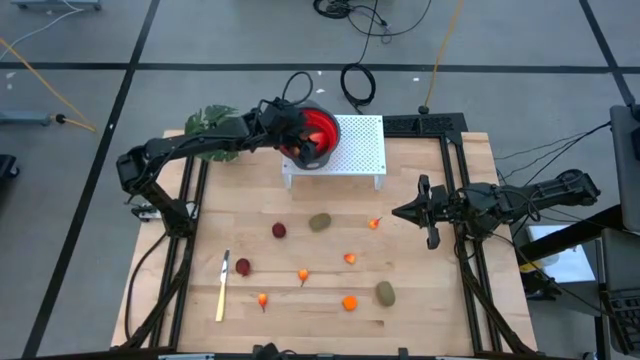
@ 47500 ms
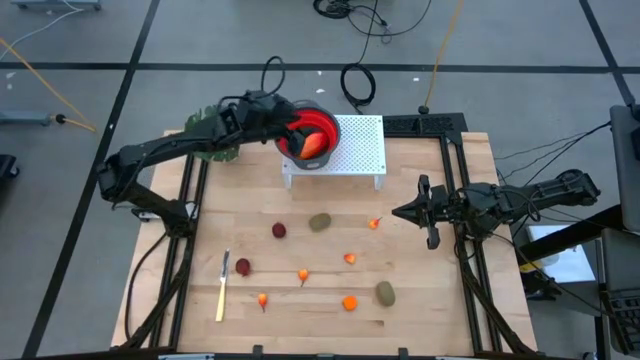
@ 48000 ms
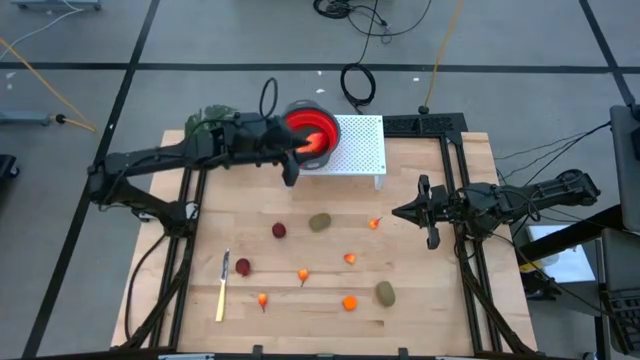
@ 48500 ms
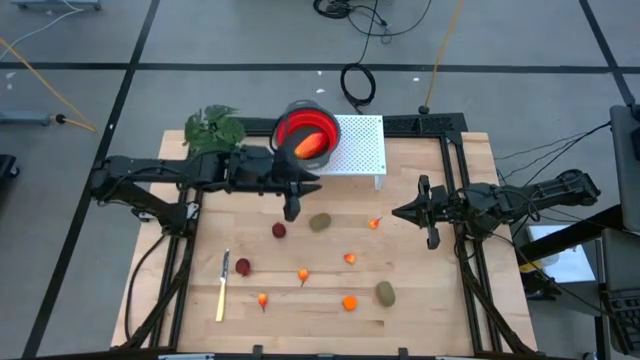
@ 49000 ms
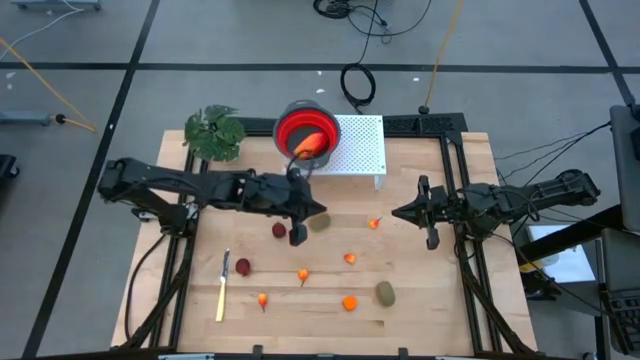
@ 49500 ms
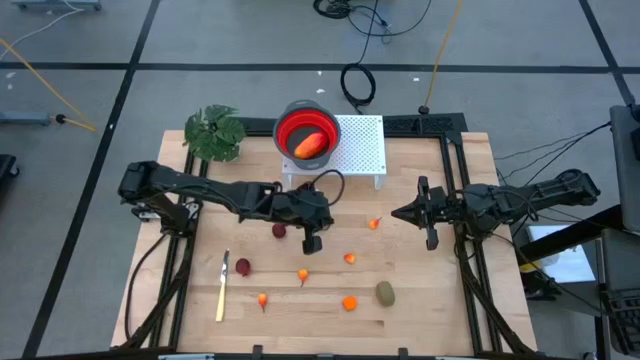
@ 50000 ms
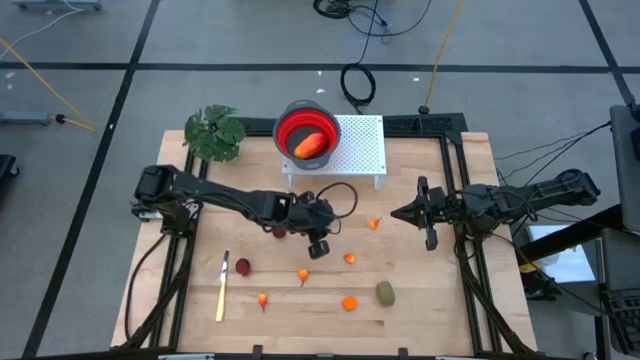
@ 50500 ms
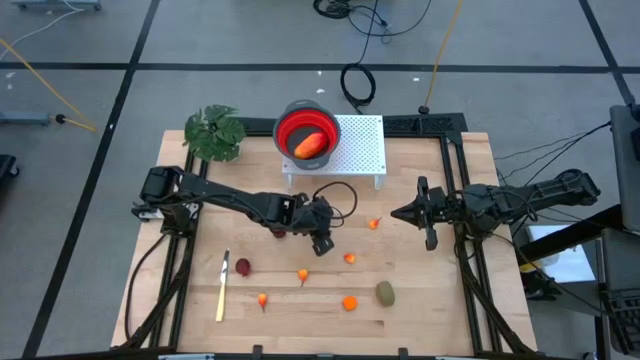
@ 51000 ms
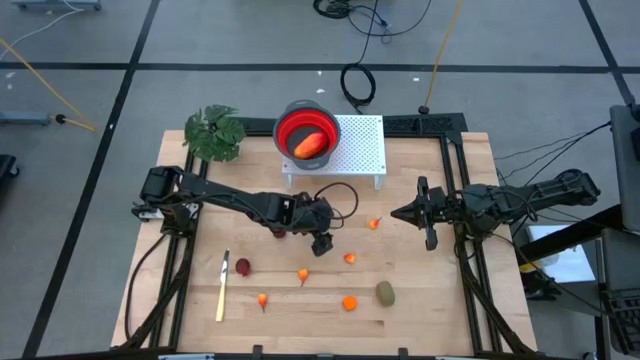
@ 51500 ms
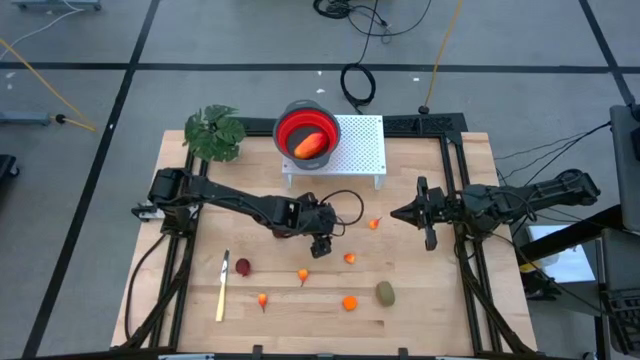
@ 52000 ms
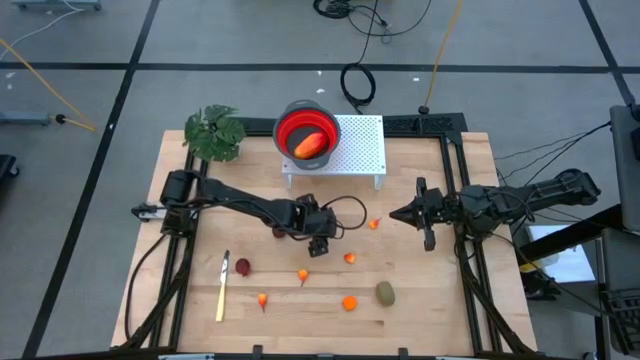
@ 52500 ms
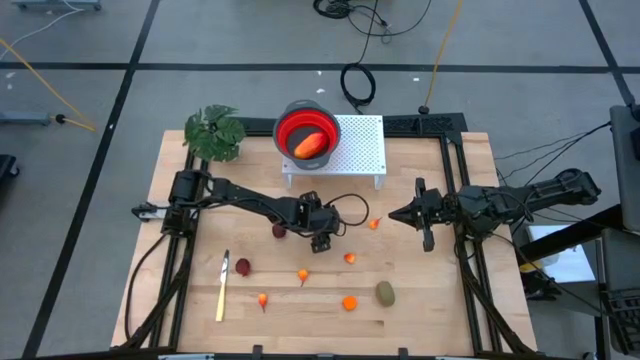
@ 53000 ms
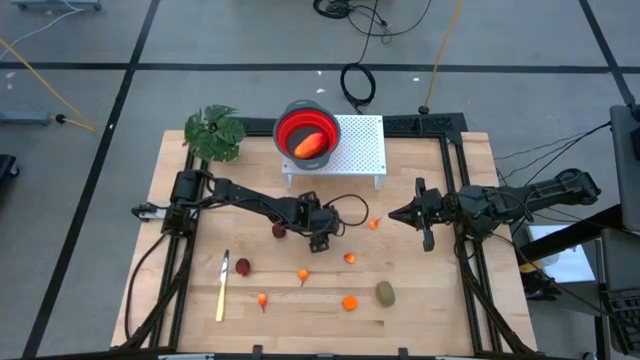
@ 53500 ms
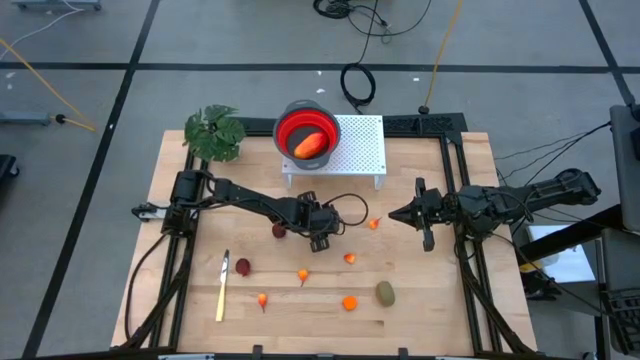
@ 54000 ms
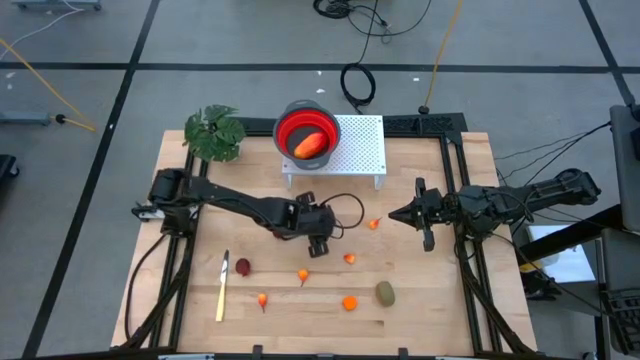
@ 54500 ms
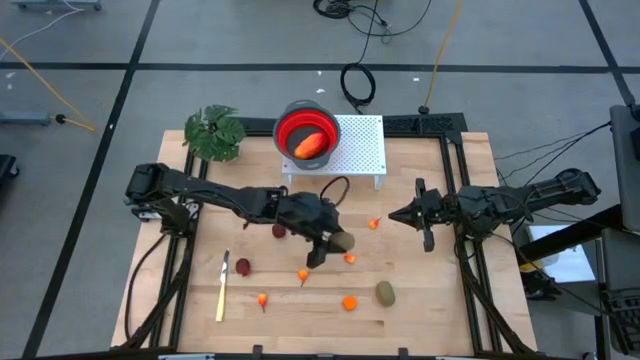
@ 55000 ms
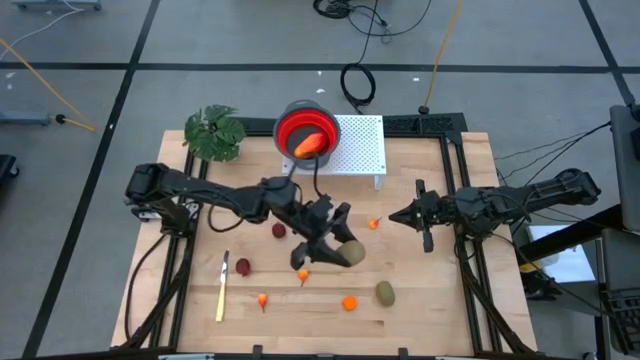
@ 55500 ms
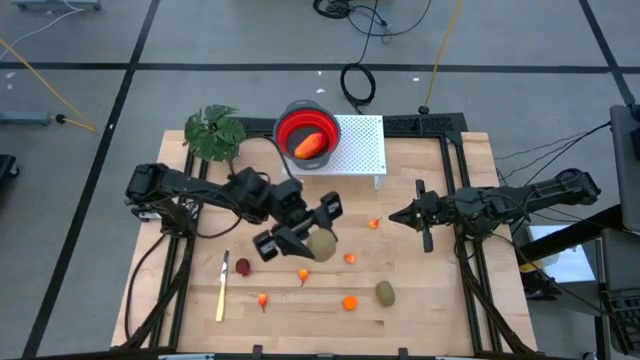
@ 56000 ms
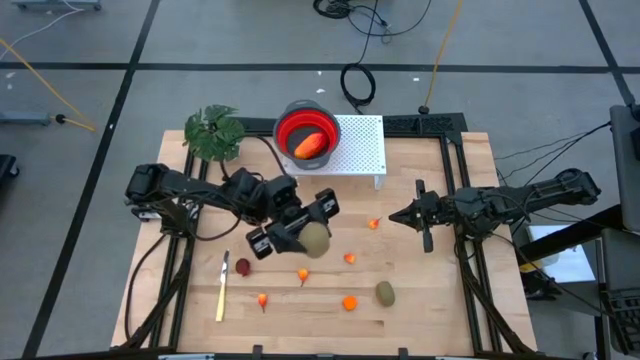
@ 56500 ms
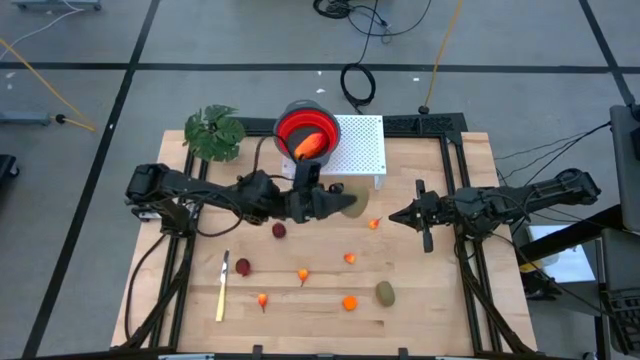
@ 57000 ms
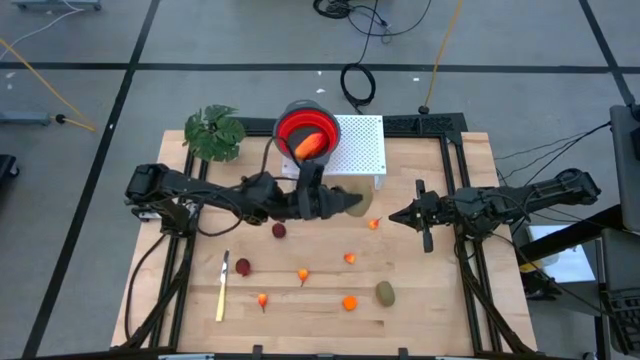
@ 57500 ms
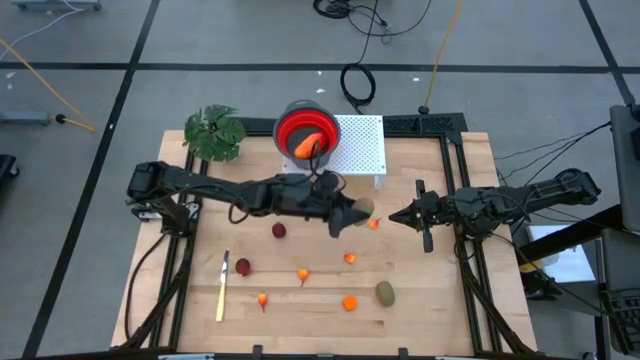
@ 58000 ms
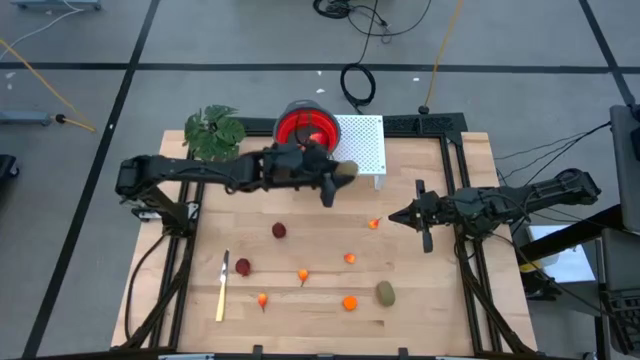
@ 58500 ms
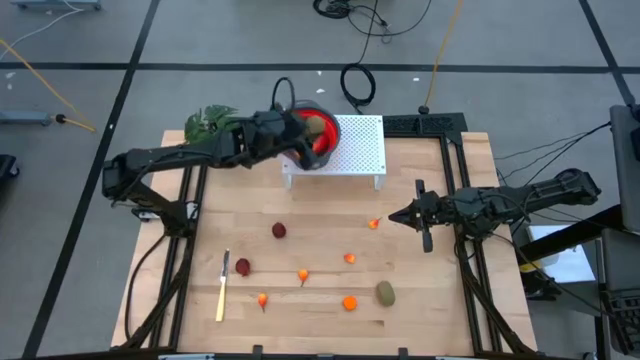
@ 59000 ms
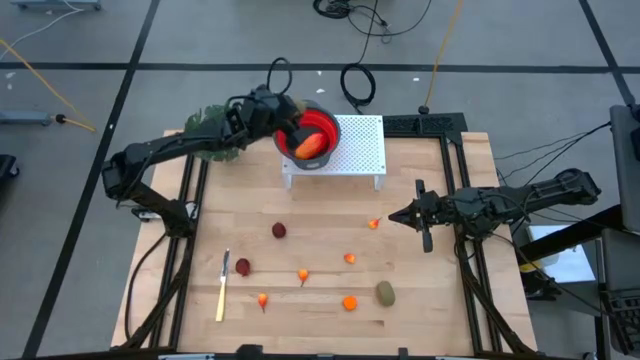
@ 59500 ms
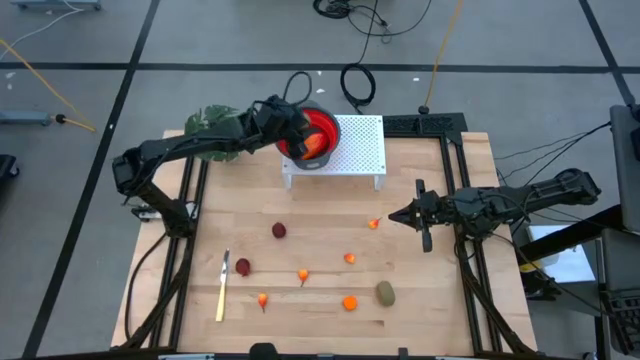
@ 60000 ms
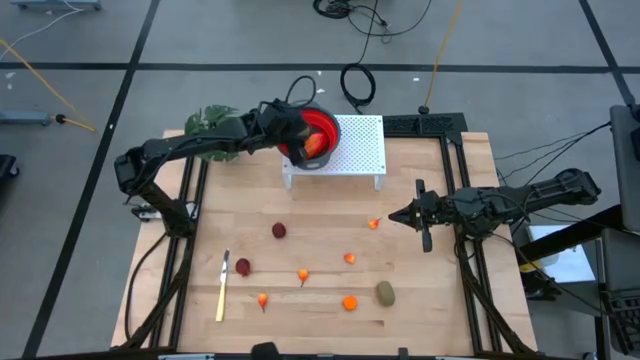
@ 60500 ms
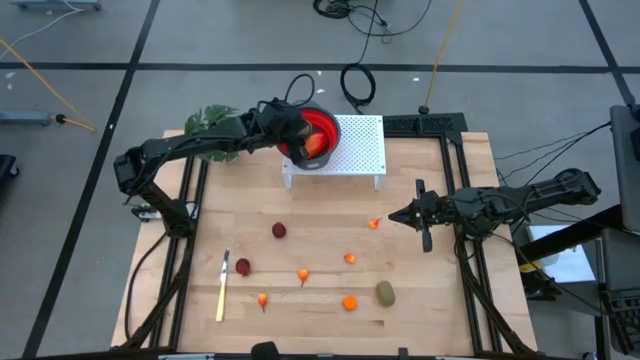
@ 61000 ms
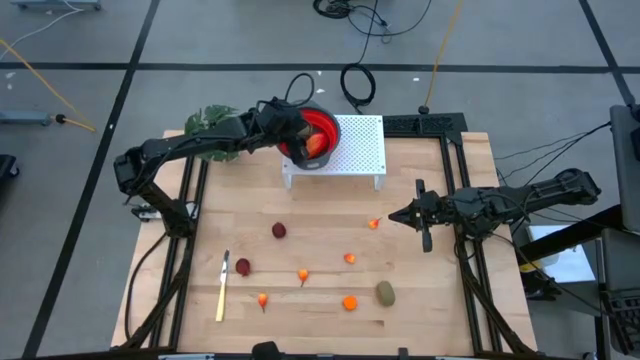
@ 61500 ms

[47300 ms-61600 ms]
Task: Pick & Place Fruit
Put the kiwi into the red strainer bowl on the shelf

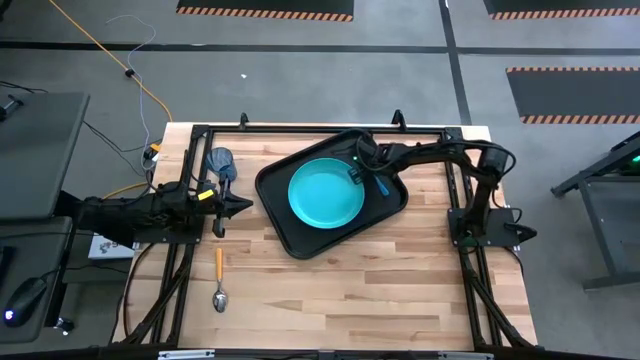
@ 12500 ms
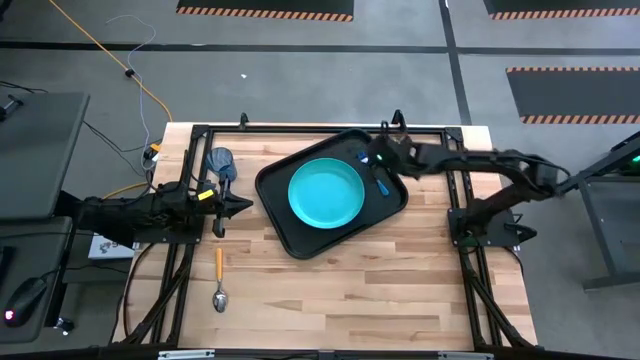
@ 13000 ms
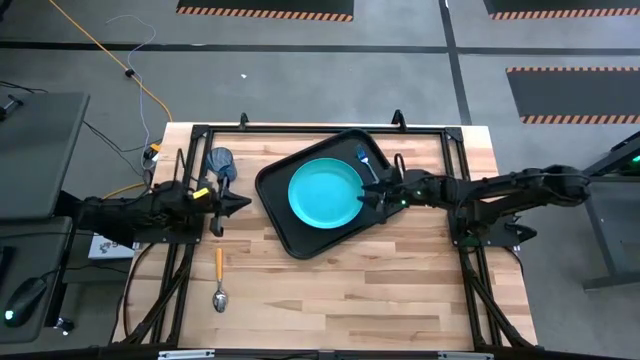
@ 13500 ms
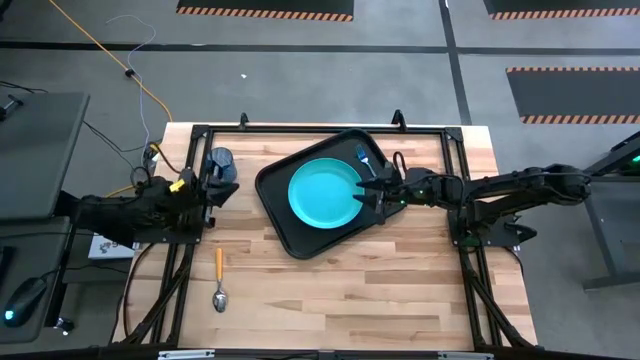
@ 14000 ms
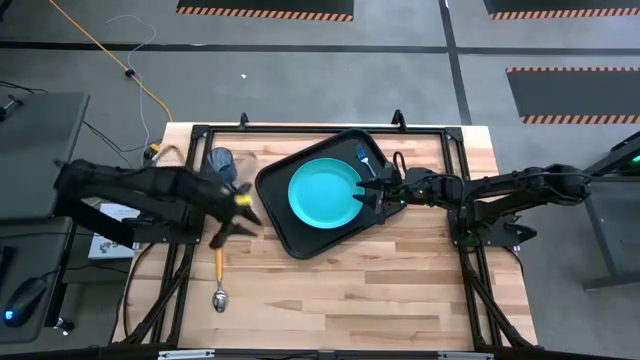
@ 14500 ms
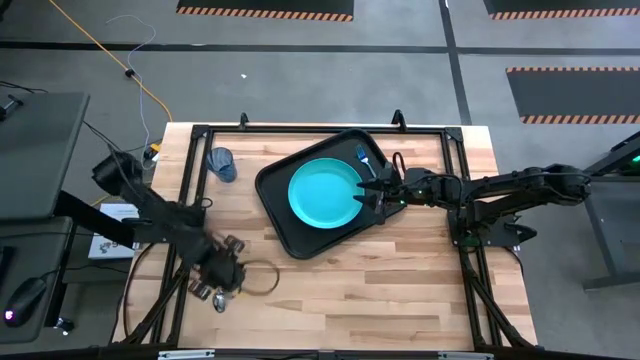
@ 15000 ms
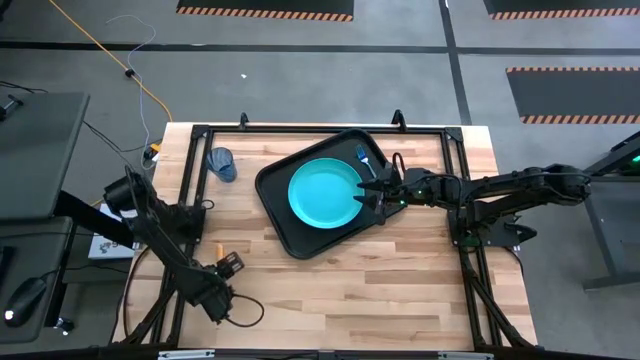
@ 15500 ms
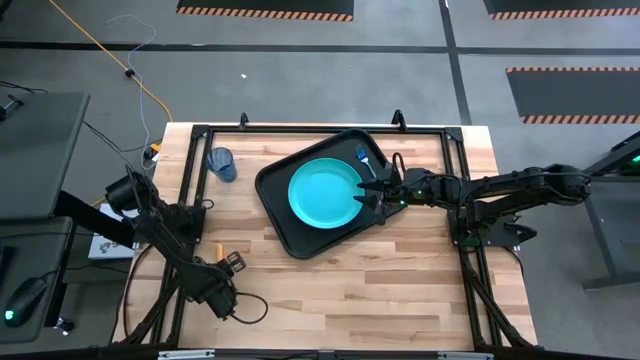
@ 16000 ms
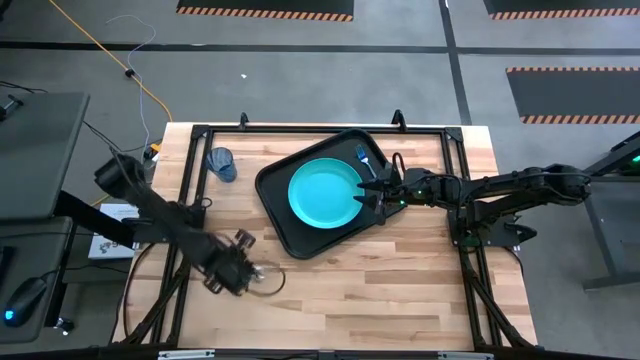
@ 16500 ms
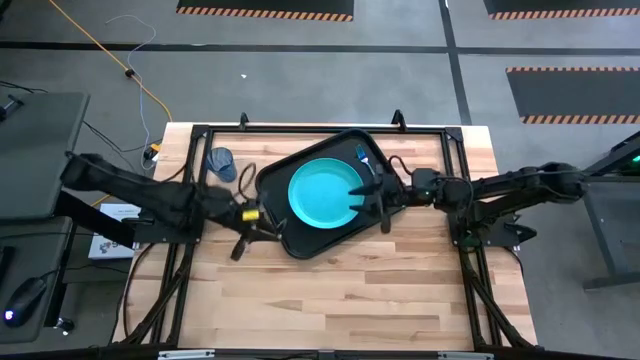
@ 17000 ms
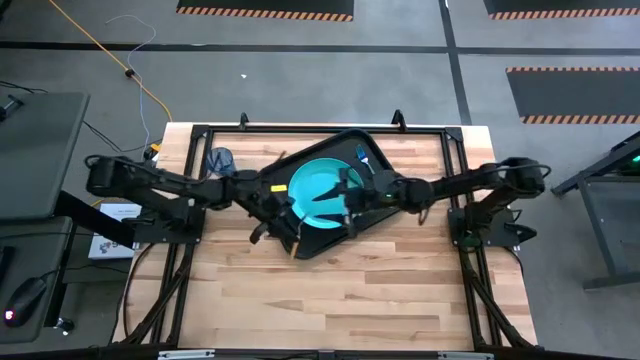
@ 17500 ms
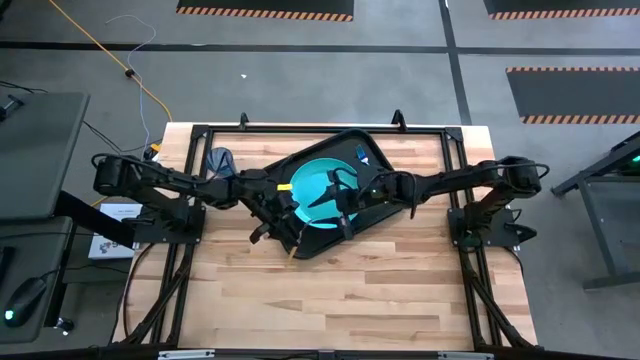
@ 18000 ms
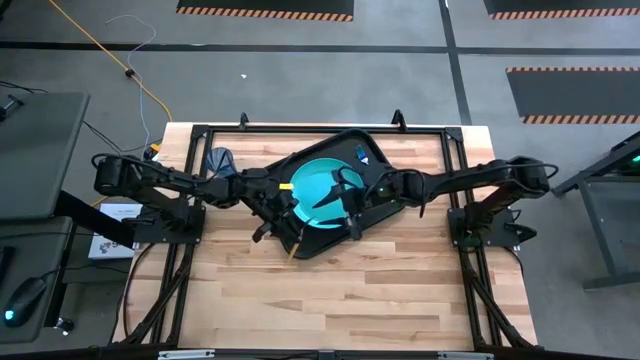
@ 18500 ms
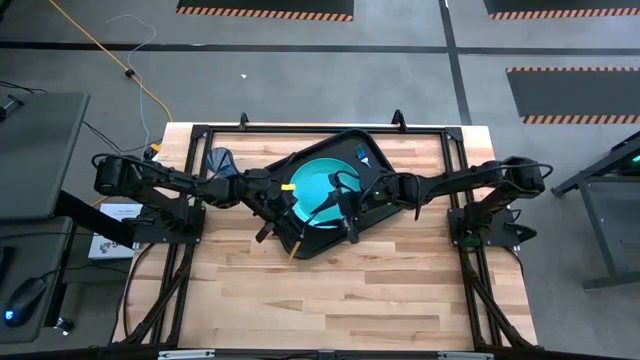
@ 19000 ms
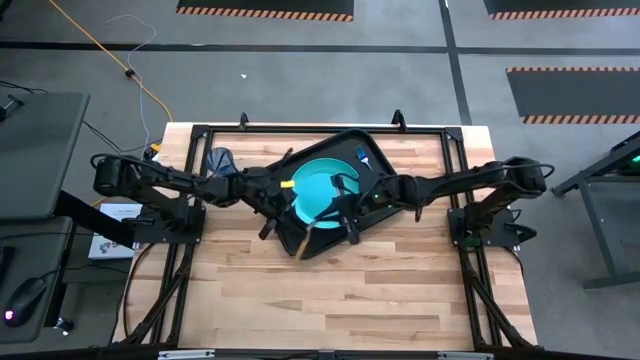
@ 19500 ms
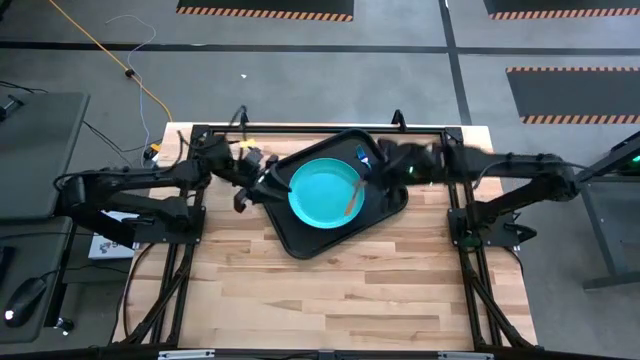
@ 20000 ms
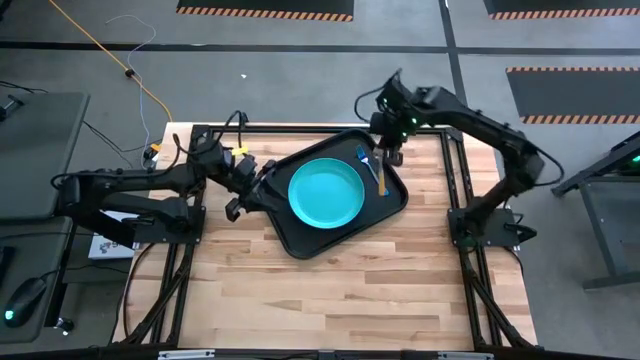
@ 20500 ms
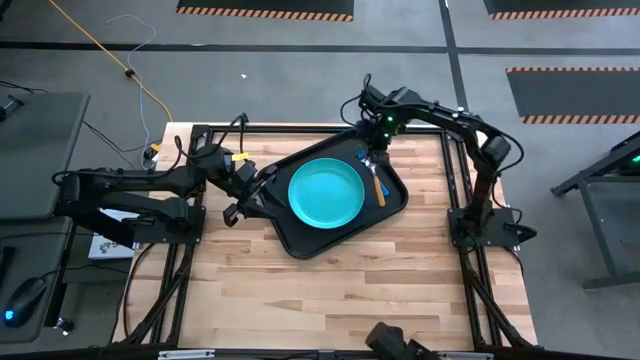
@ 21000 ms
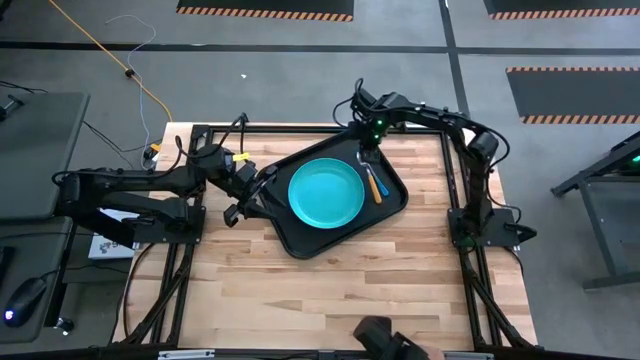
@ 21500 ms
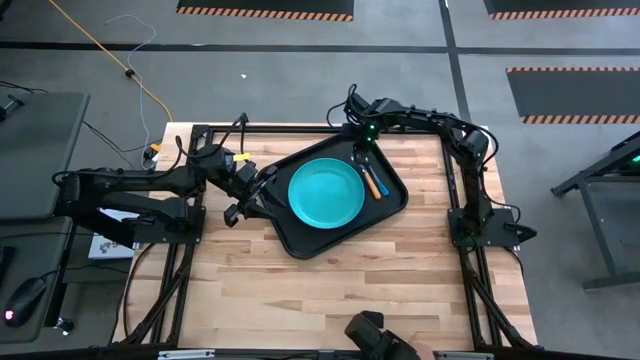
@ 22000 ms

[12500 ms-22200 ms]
Task: Pick and place plate/cup/fork/spoon on tray
Put the orange spoon on the left side of the blue fork
